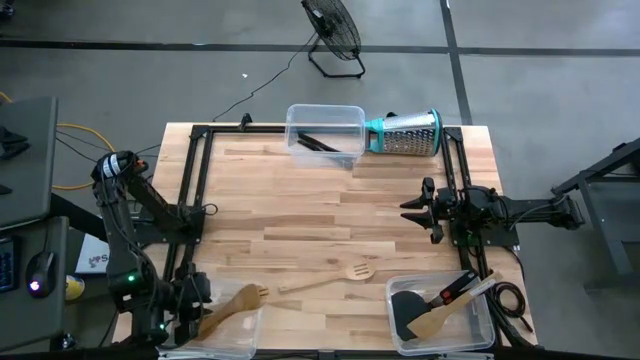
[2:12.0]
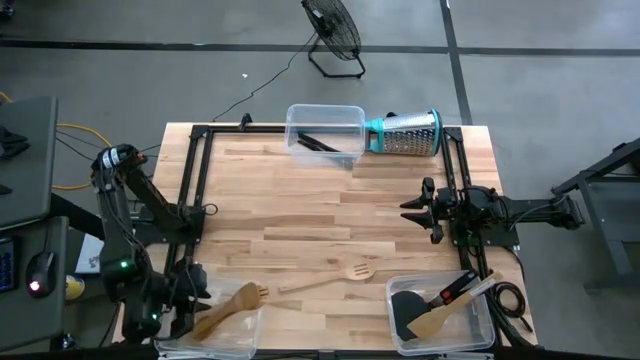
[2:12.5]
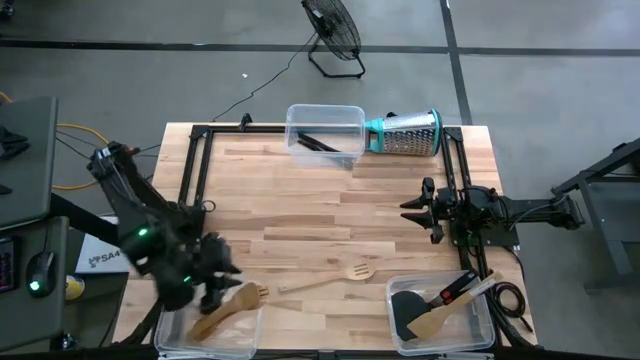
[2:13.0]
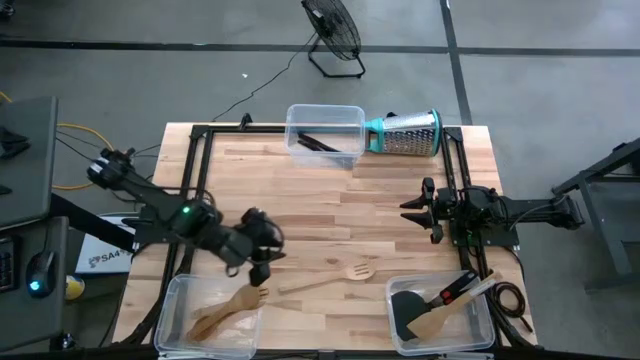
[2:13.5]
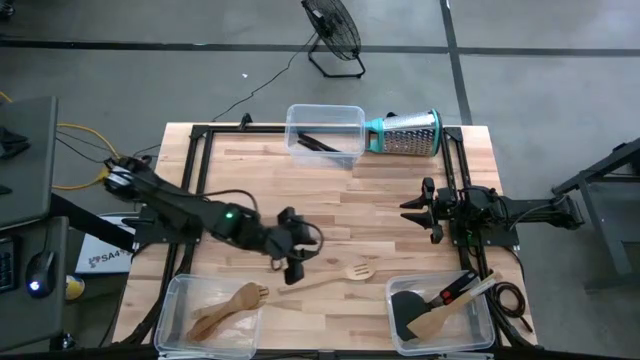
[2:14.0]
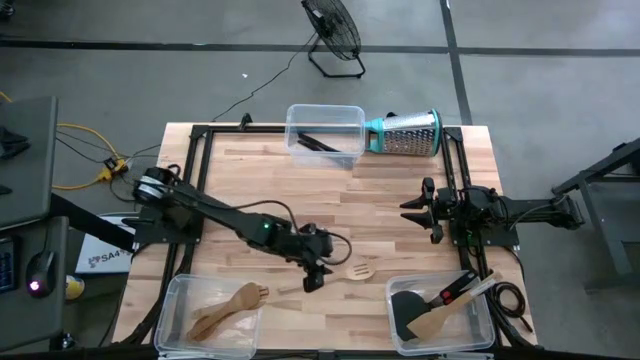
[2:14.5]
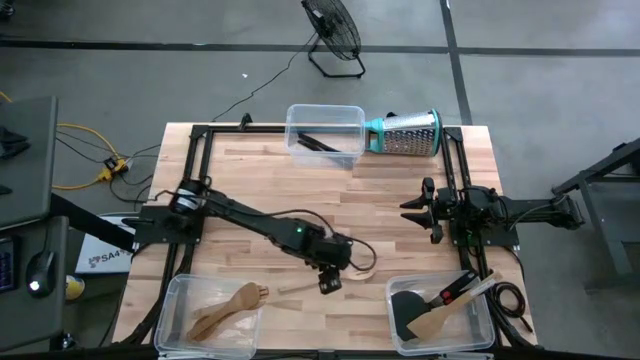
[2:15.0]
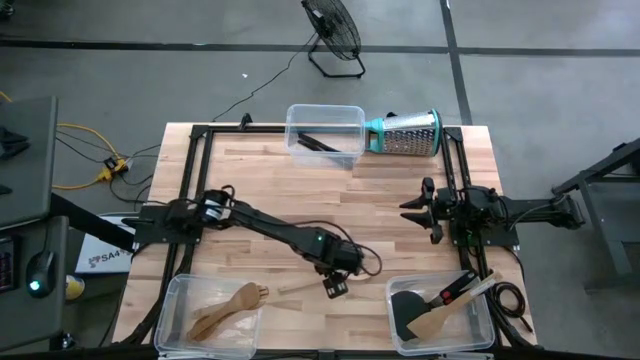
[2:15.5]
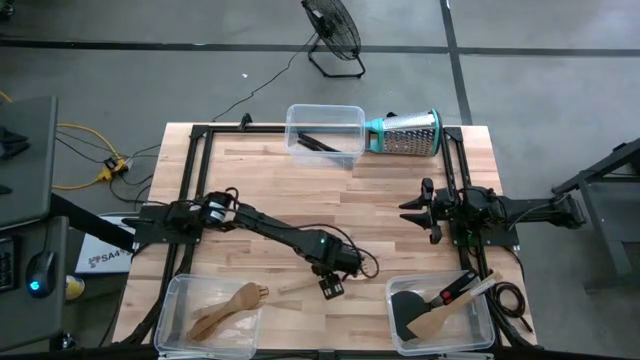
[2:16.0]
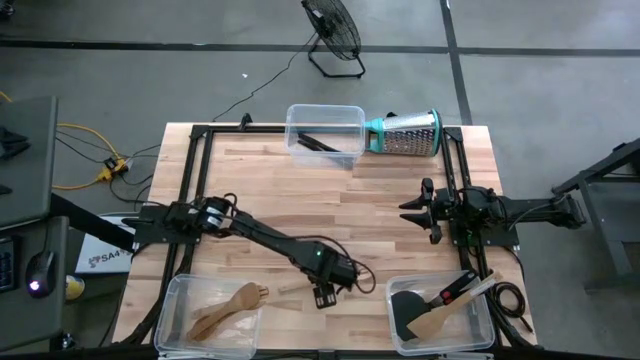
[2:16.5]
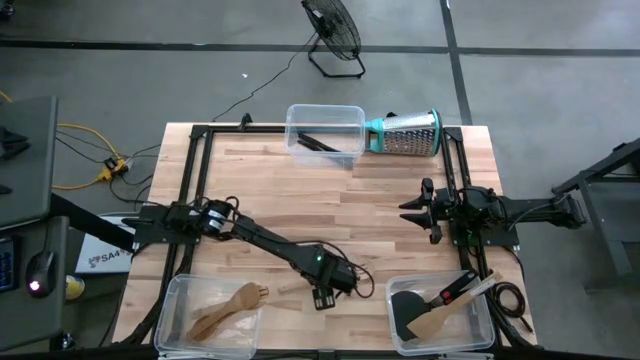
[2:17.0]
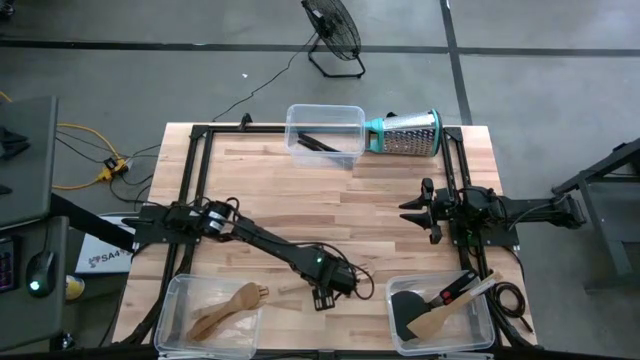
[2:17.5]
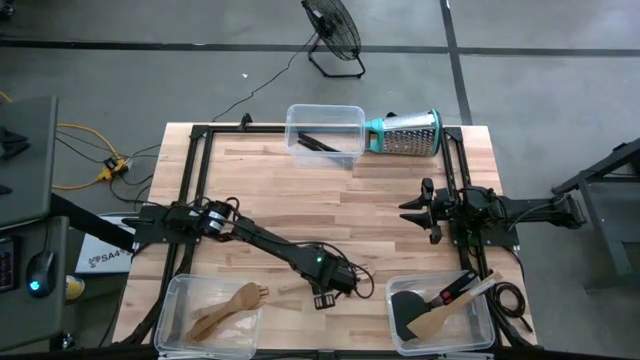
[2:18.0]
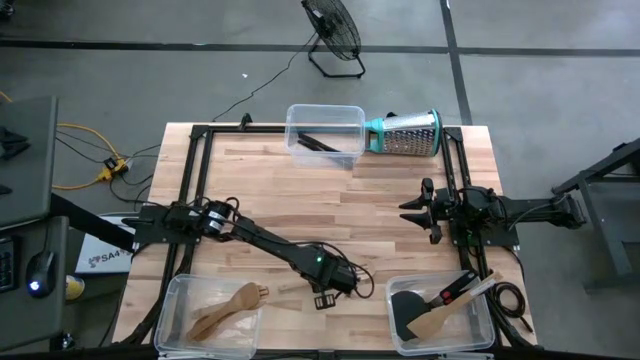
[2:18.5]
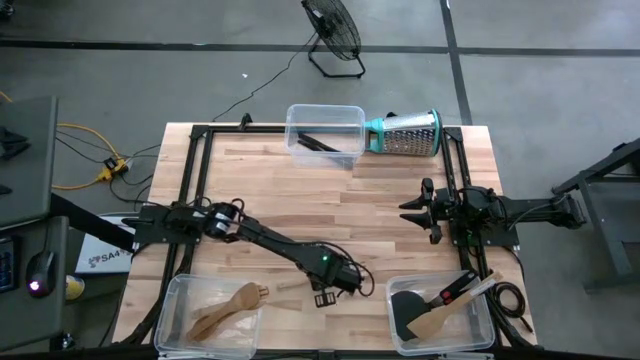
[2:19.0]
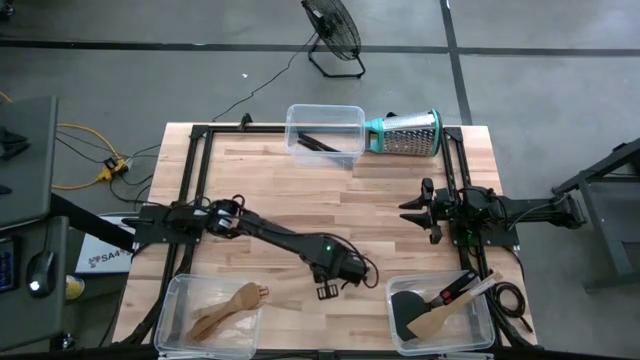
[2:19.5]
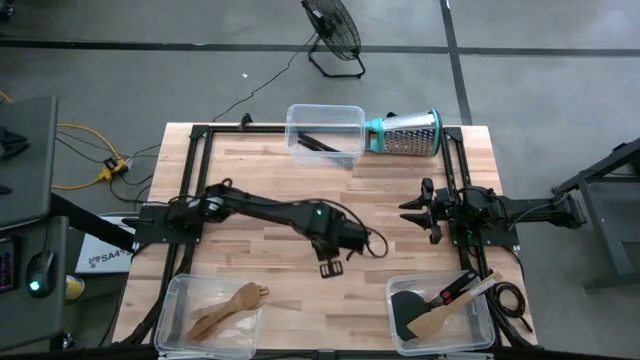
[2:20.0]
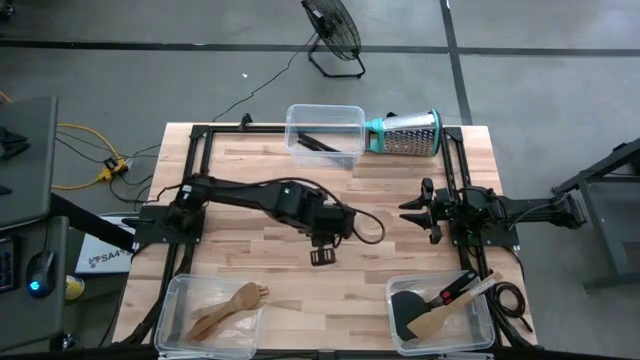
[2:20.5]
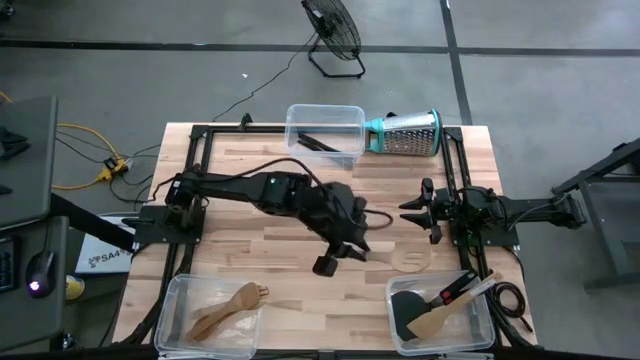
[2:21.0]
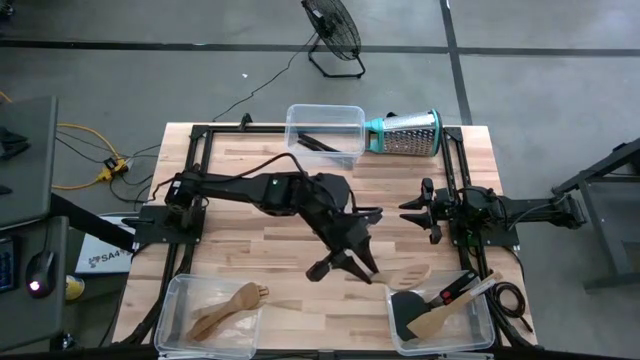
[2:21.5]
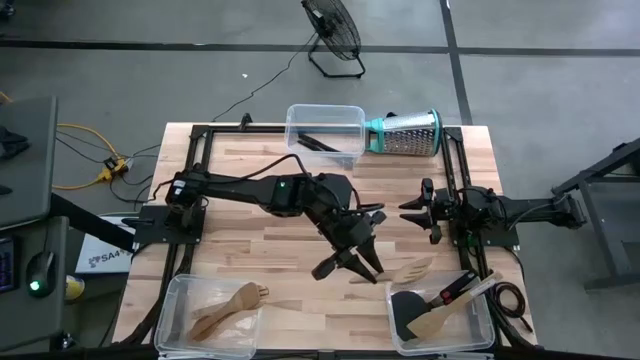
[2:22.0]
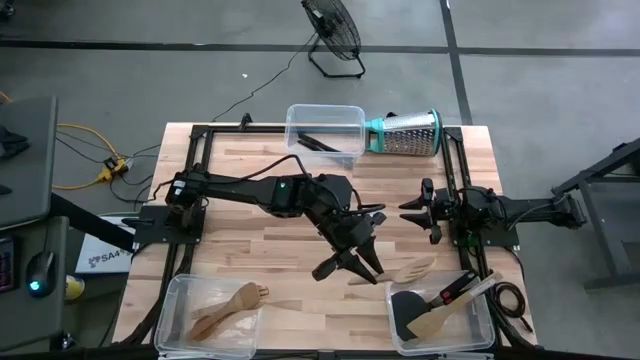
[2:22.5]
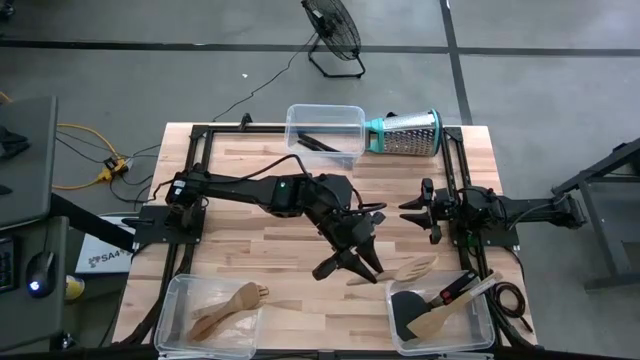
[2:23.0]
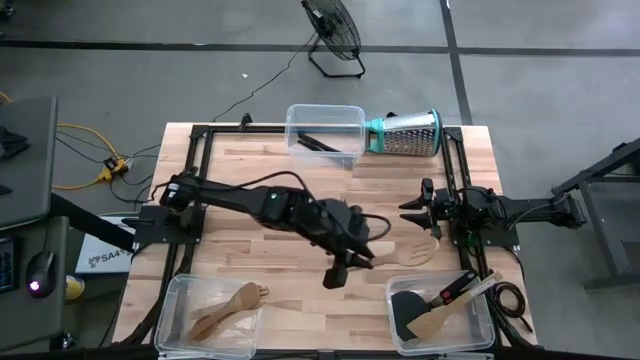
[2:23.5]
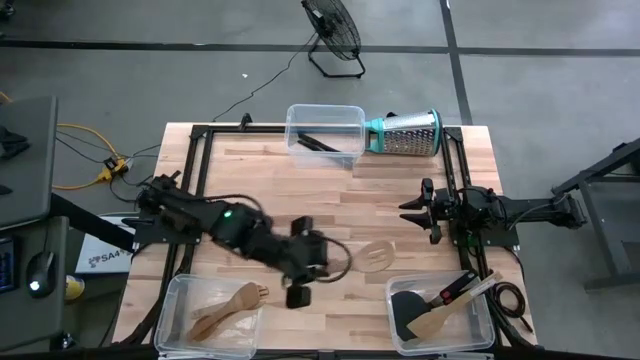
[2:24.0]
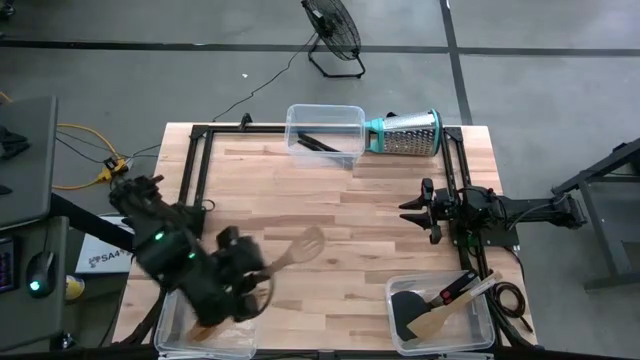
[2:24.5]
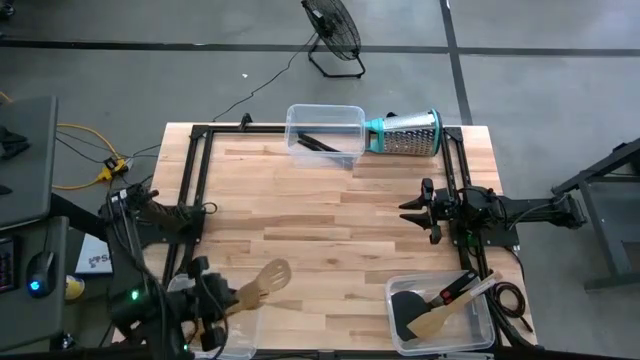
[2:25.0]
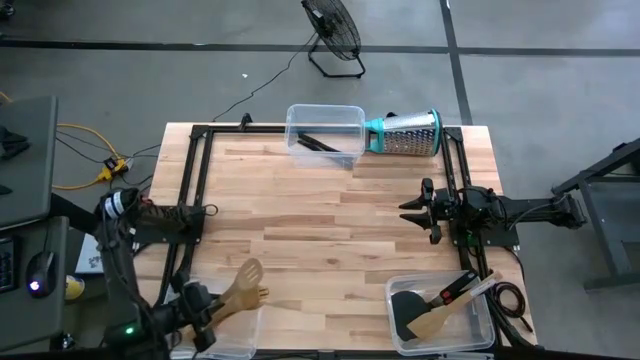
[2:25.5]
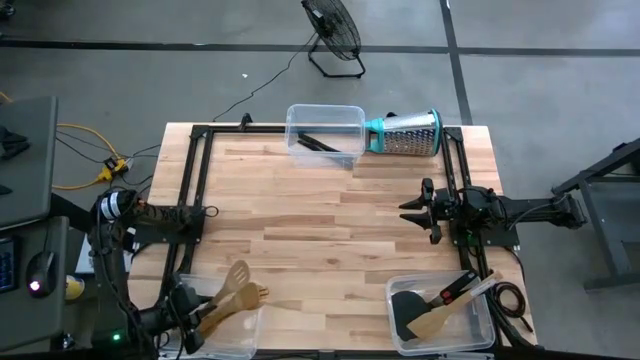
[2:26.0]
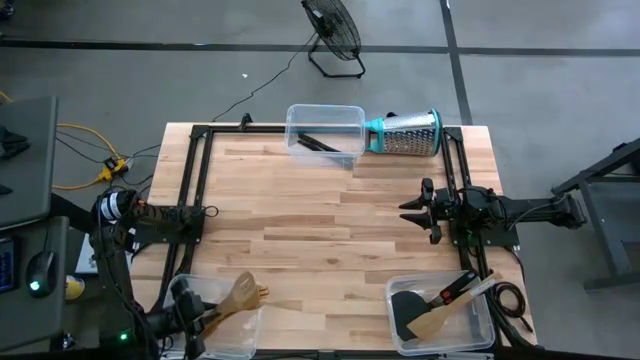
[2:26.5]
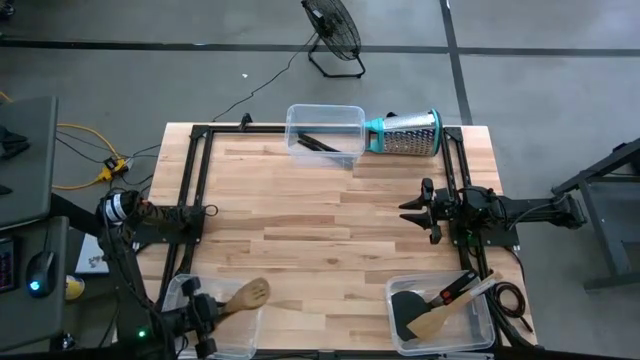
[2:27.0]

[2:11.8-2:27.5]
Task: Pick & Place Kitchen Items
Put the brown serving spoon into the bottom left transparent bin

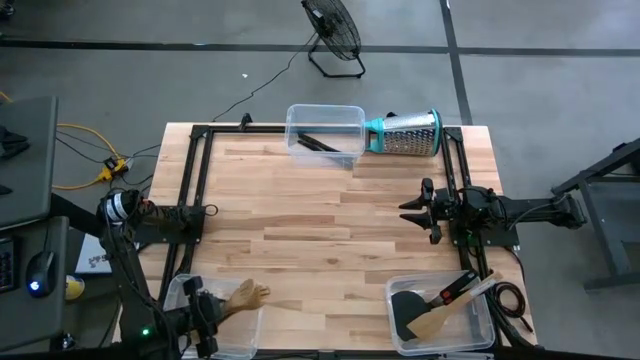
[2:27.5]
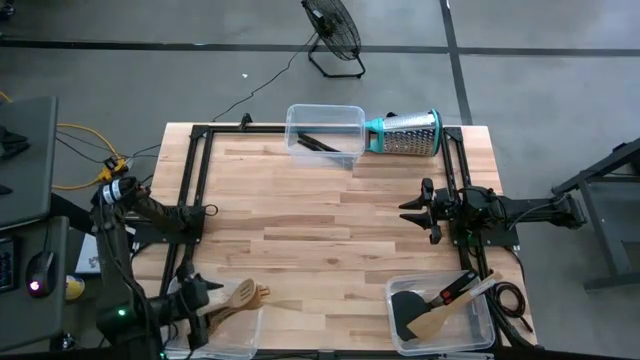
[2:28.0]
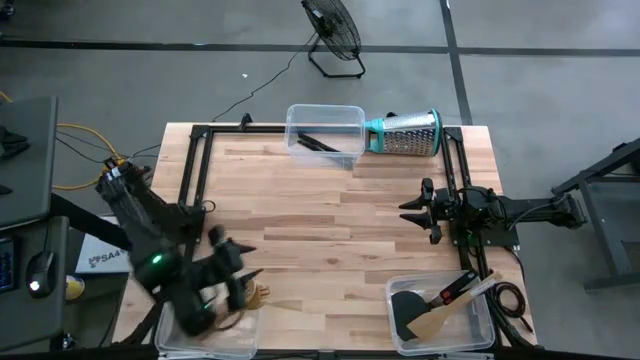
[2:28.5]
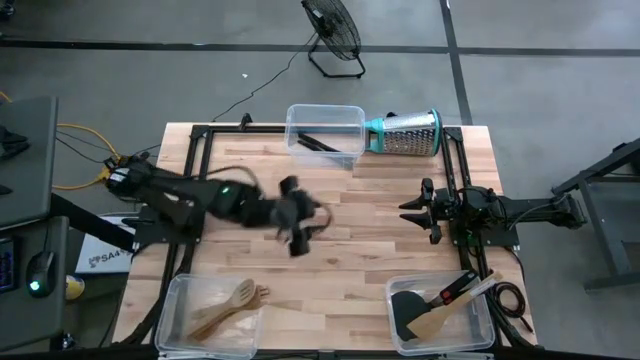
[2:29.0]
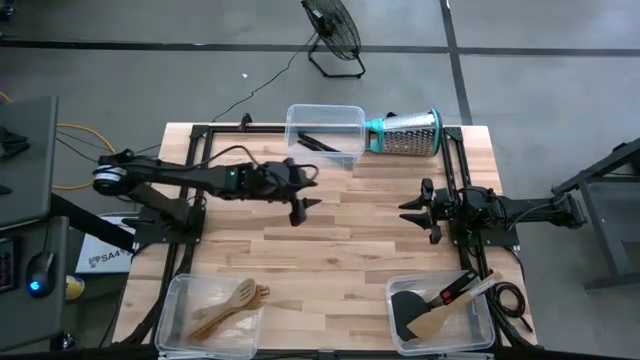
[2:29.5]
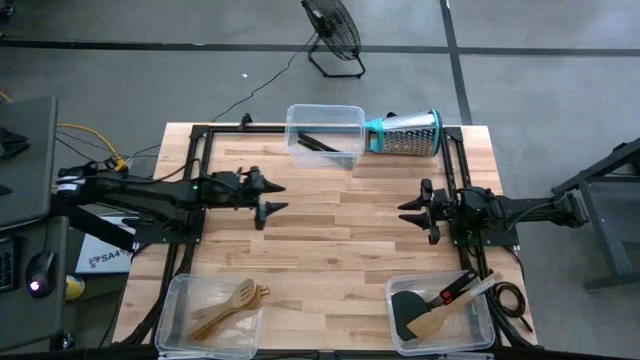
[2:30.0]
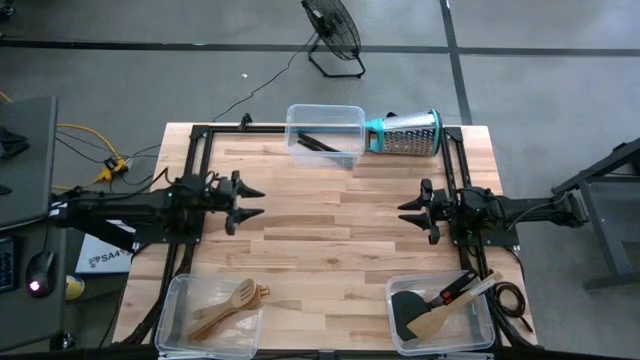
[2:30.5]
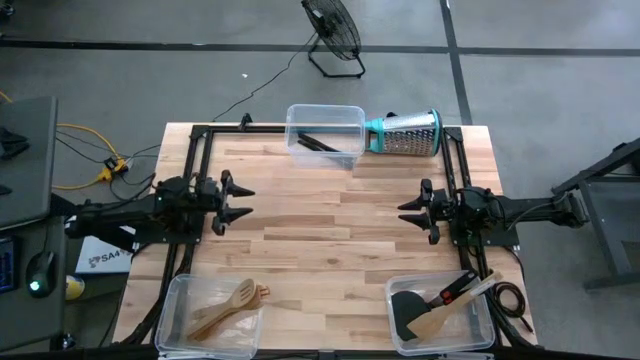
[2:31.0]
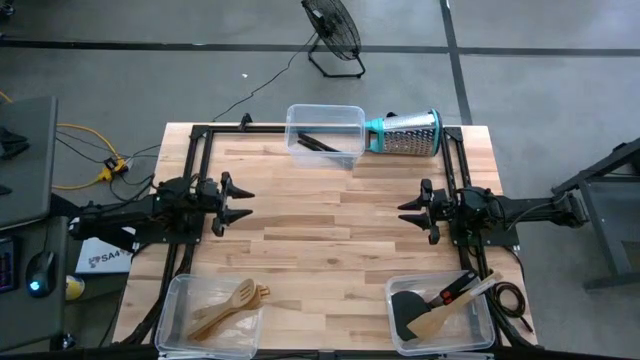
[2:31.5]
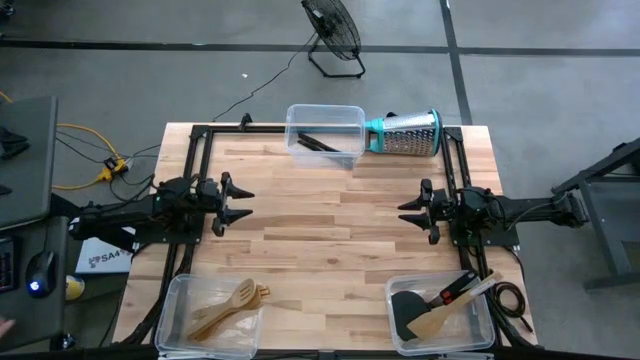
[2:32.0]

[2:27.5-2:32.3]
Return to Home Position

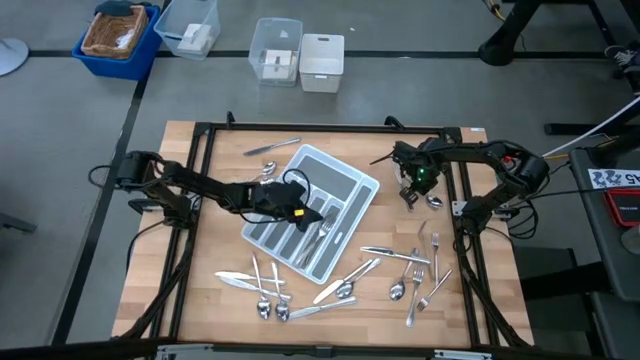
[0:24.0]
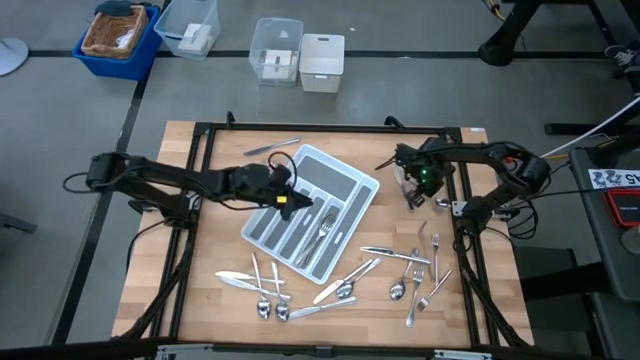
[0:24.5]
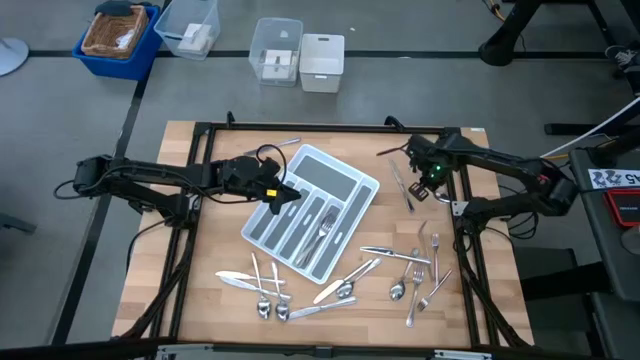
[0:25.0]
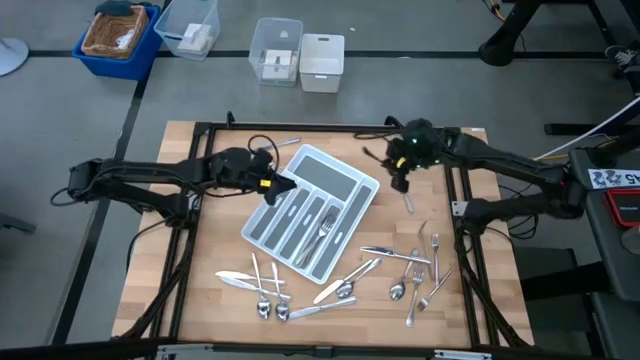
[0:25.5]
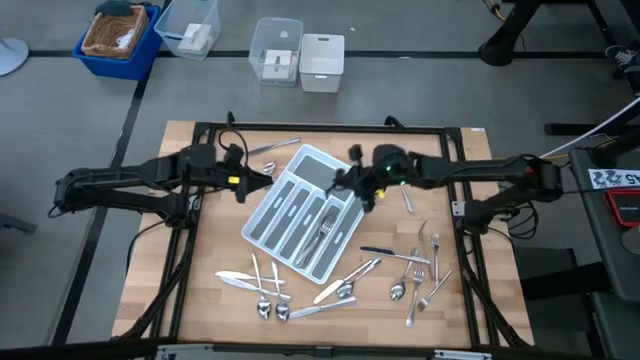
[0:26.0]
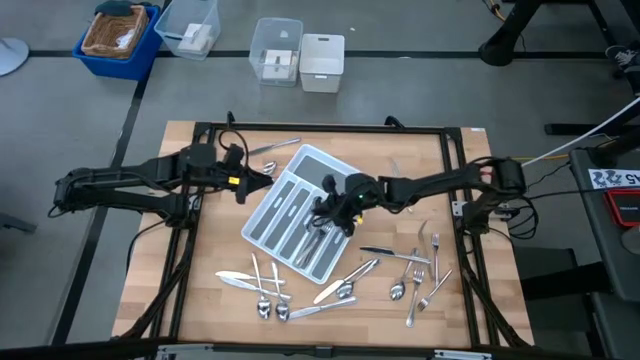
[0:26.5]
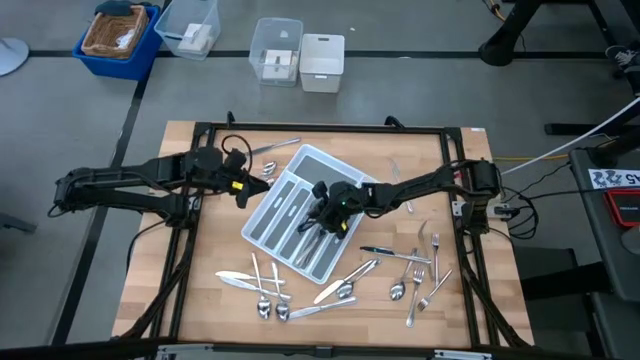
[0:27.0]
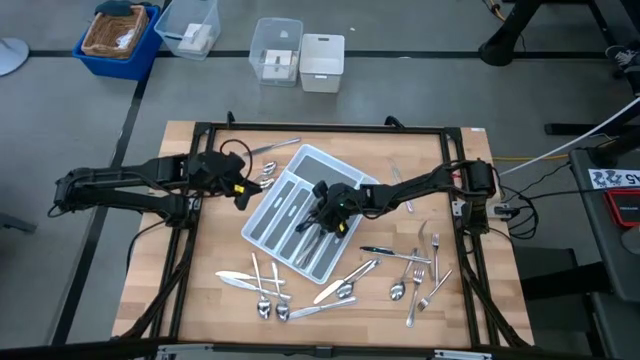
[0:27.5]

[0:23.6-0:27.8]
Task: Sort silverware
Put the silver spoon into the white cutlery tray
